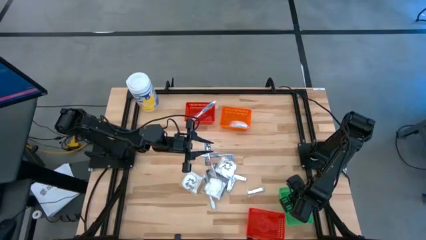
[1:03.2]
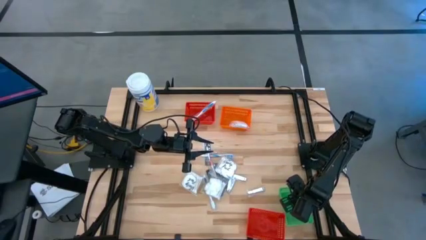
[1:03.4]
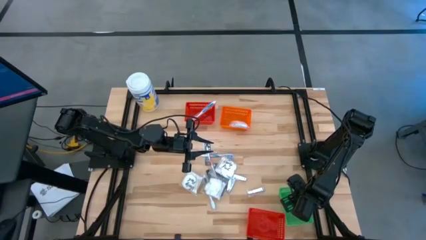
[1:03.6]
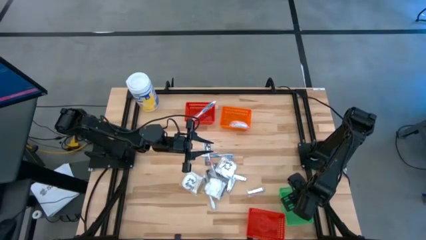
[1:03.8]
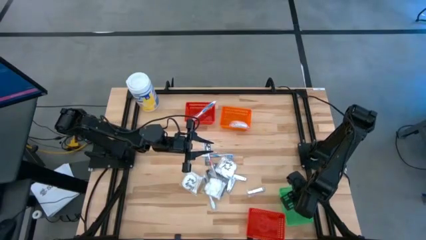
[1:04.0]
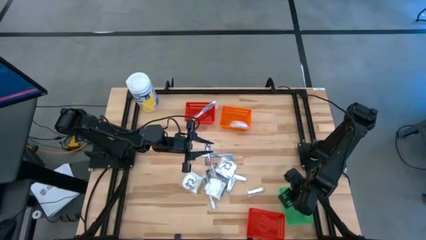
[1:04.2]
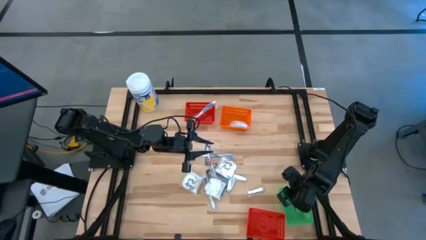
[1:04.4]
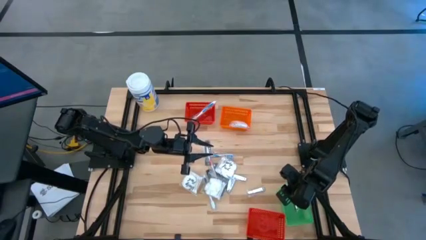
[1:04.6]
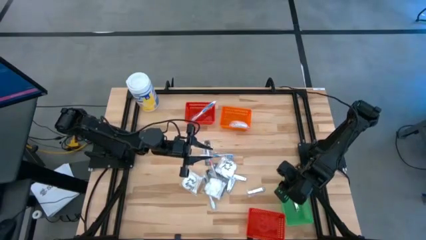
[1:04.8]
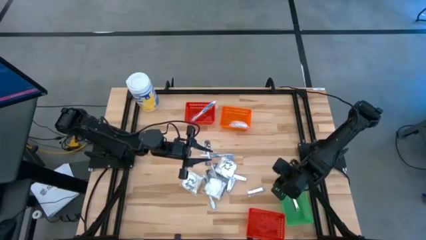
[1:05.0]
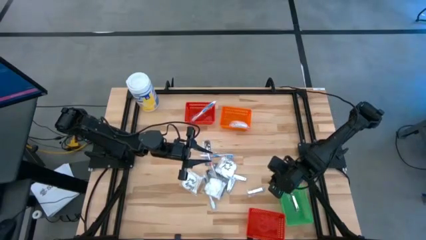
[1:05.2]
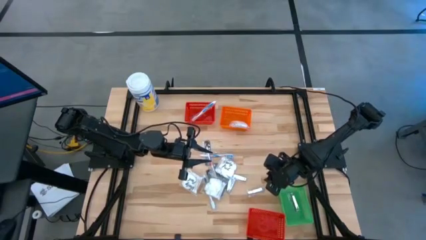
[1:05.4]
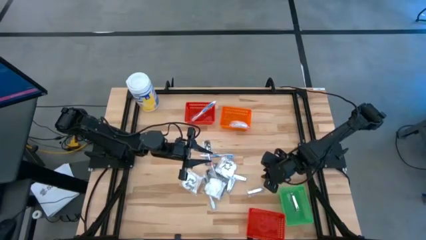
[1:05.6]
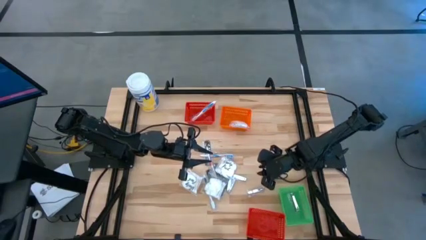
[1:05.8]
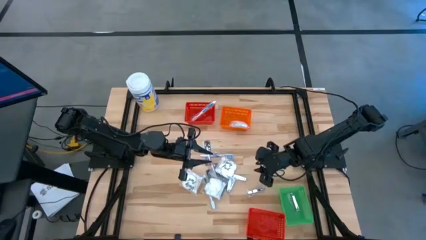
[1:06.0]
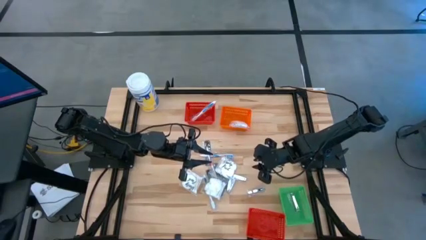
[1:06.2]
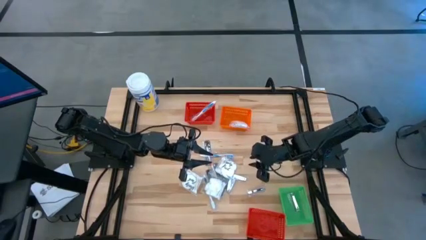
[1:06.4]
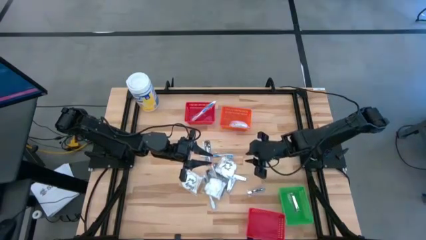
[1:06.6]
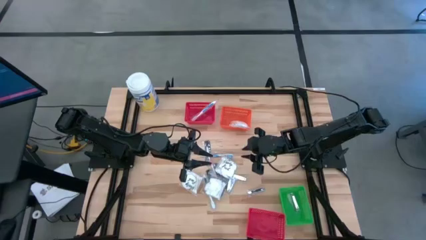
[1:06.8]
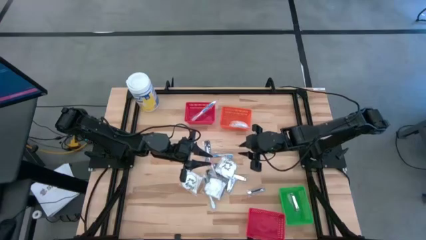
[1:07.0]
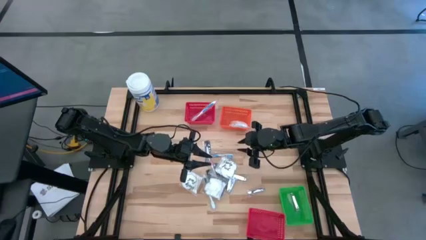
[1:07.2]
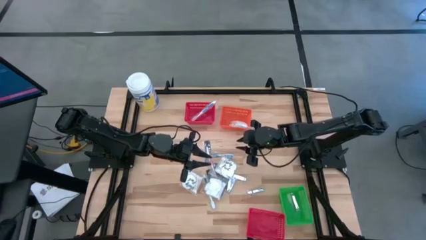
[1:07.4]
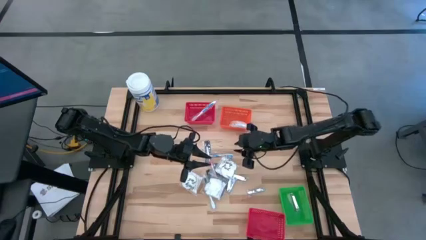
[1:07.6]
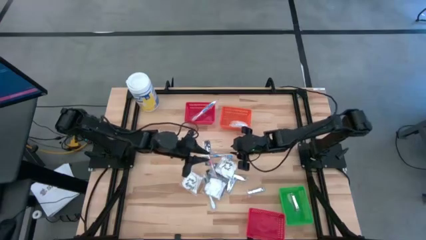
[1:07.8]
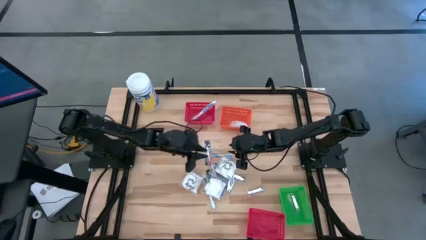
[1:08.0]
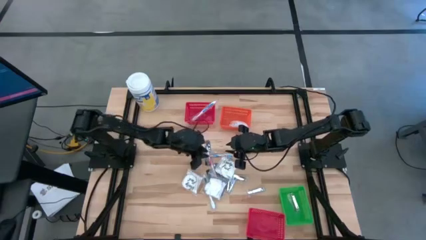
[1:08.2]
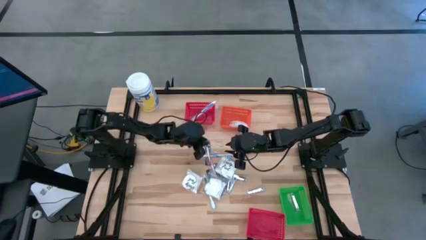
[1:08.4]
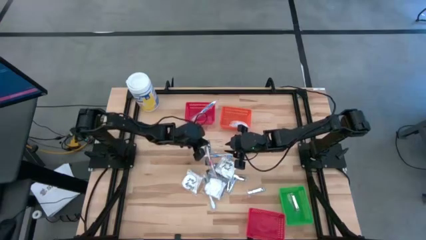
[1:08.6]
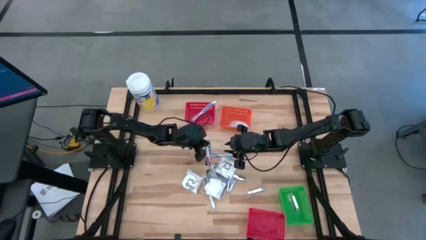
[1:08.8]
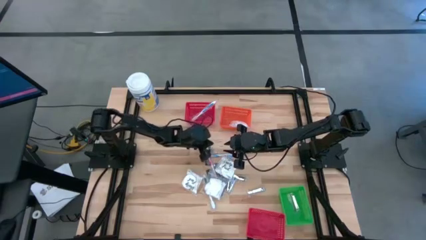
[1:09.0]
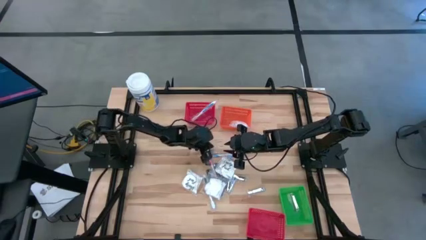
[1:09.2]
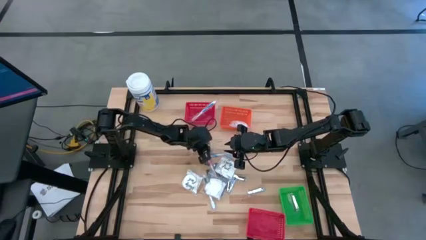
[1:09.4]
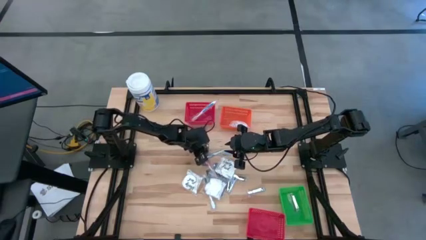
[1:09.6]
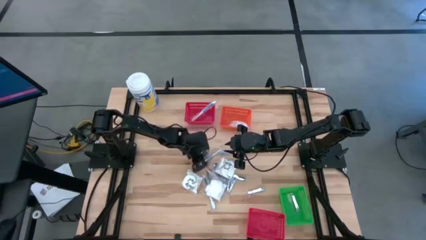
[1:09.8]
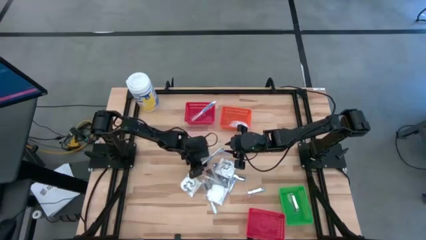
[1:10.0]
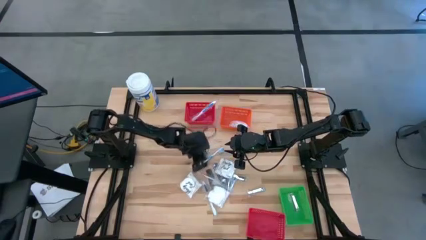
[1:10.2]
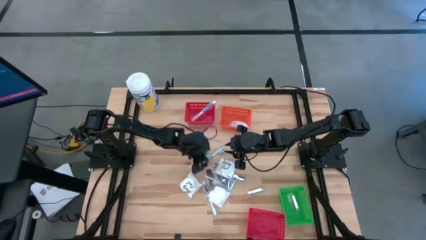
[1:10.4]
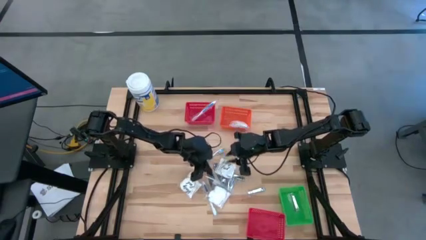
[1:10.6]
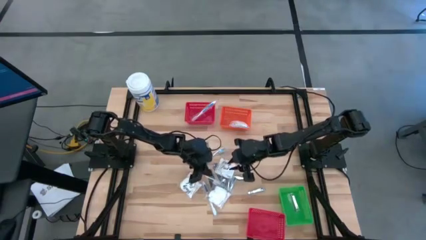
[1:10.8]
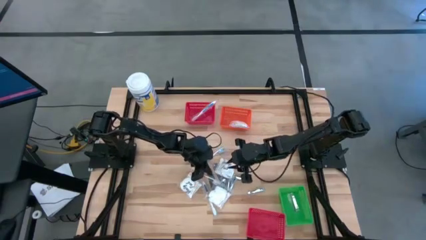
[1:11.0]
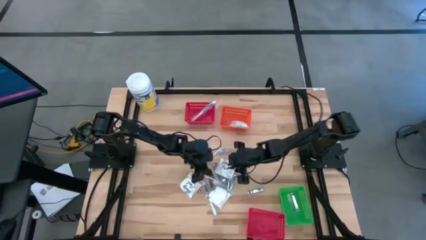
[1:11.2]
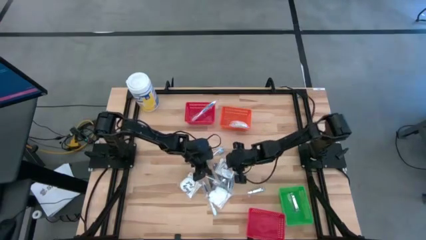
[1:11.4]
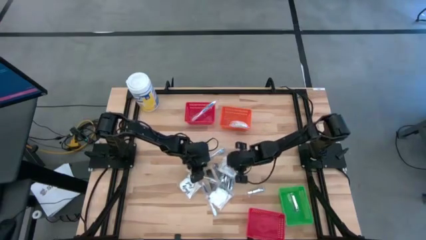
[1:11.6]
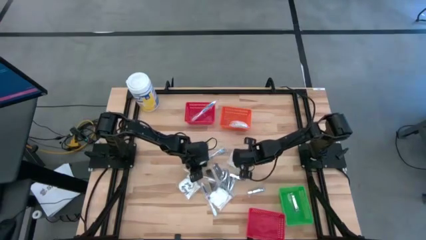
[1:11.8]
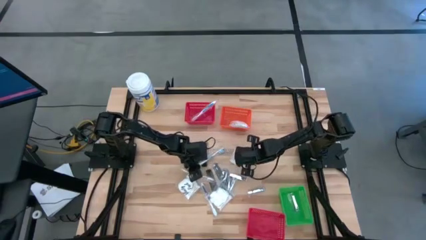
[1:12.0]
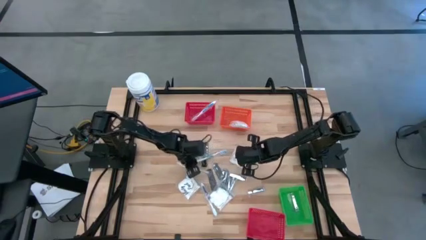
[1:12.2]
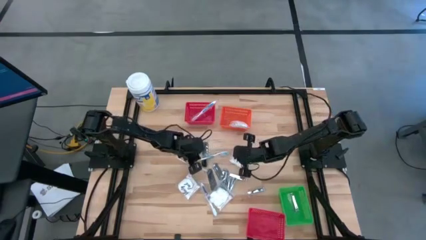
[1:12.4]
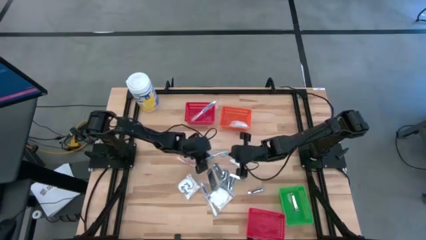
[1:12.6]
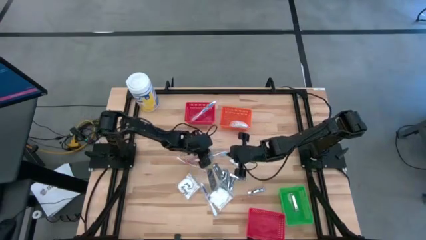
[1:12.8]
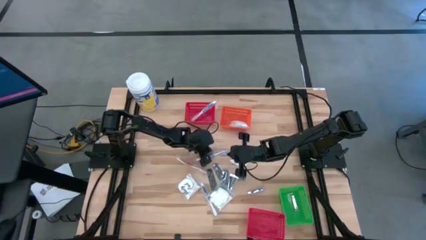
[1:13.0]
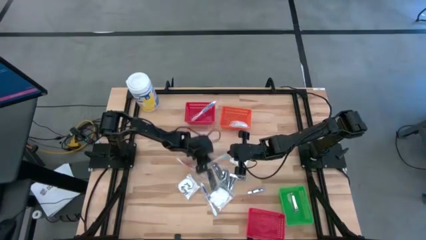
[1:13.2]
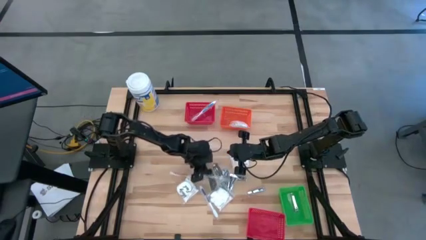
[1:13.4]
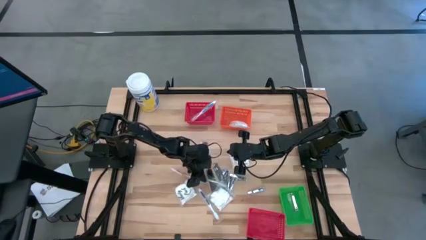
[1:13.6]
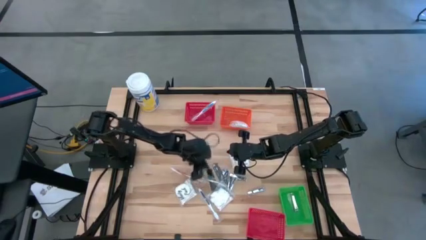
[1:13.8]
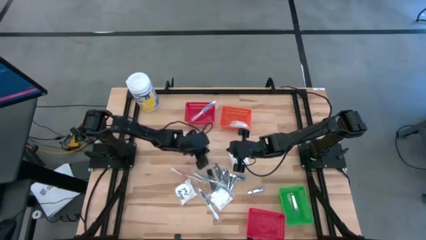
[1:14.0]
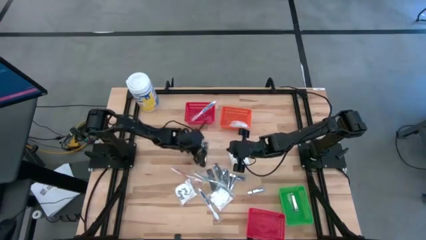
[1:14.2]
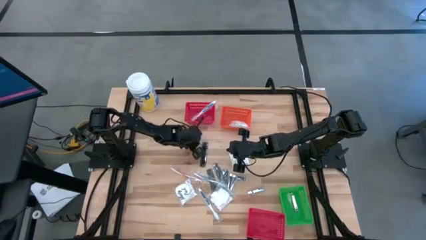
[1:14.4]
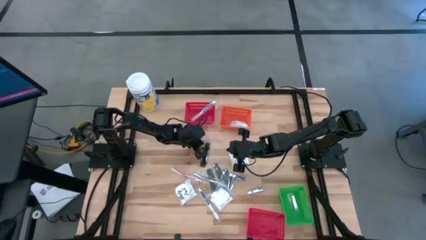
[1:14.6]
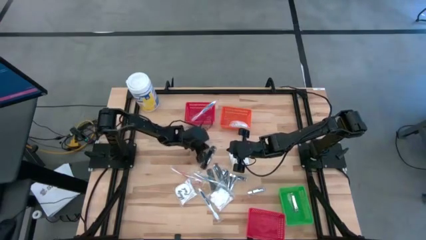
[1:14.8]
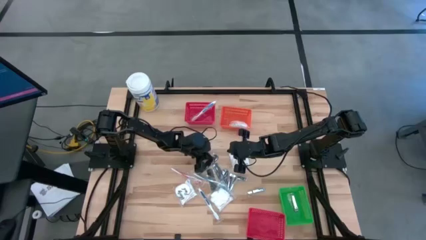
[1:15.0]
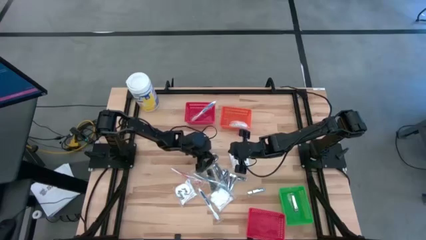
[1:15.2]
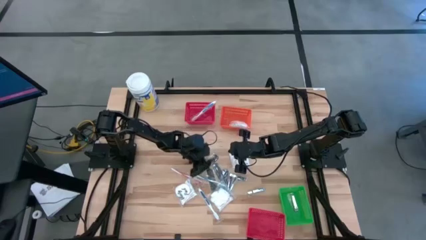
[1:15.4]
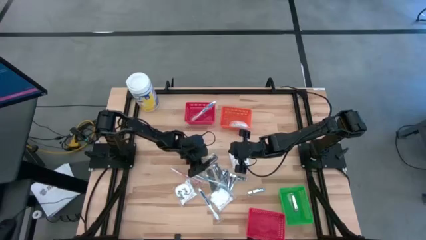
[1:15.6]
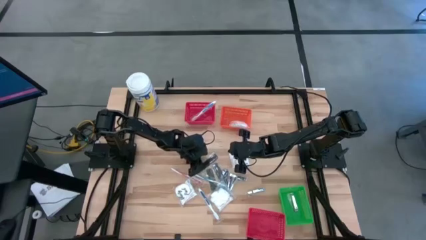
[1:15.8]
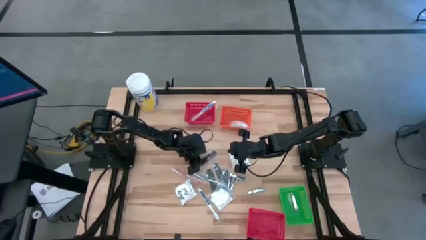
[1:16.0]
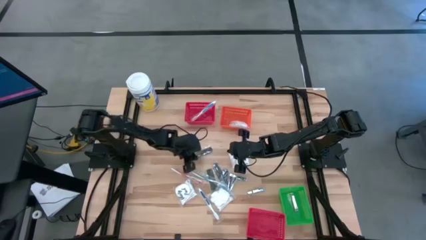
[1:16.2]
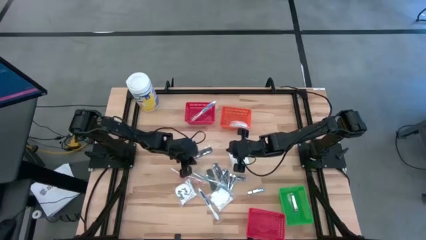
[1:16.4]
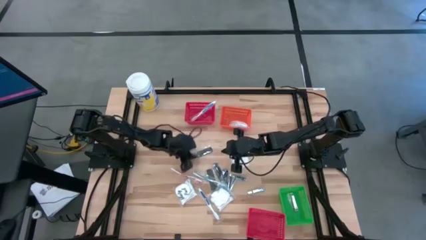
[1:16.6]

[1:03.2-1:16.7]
Task: Pick & Place Travel size toiletries
Put the black hair comb into the bottom red bin
